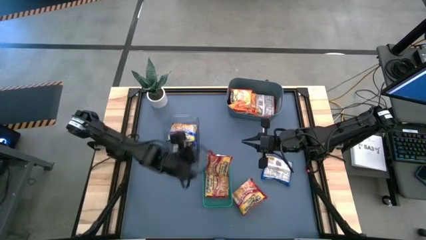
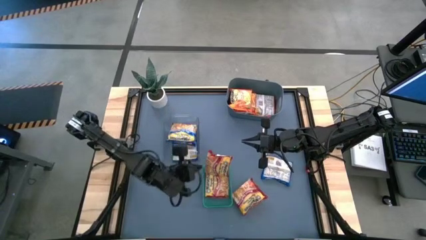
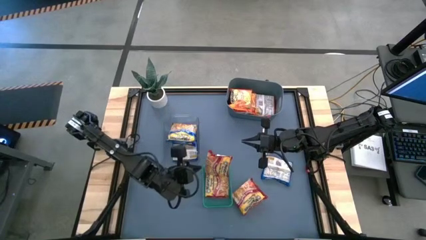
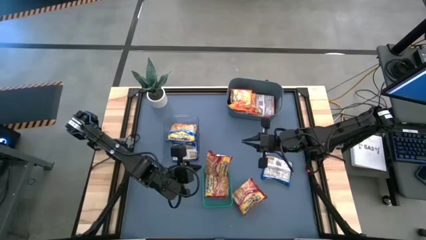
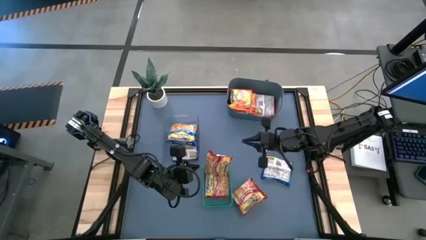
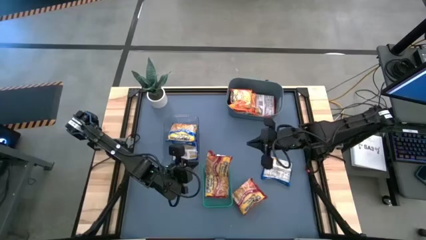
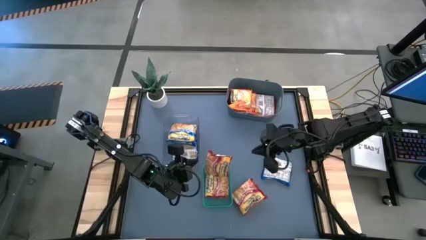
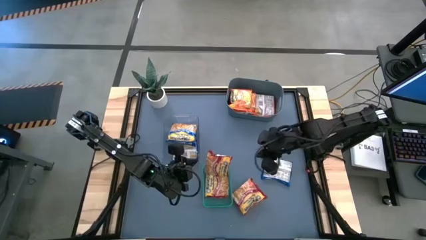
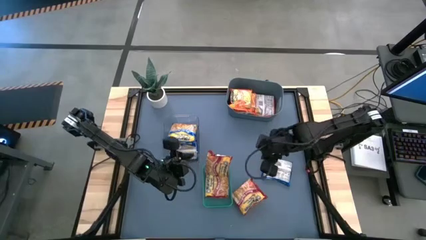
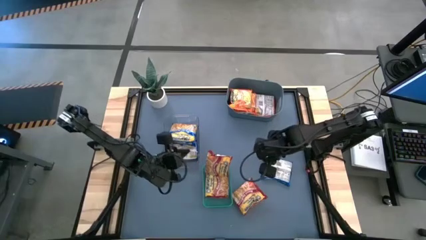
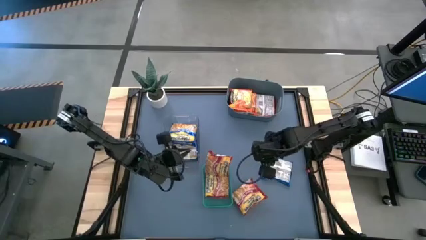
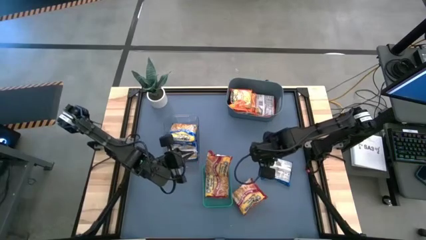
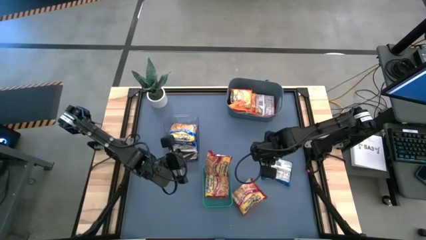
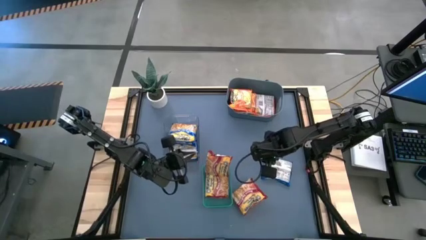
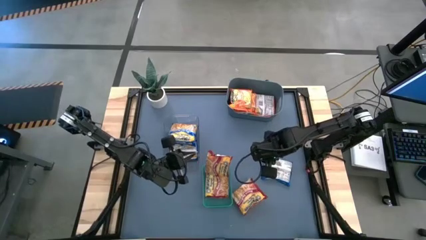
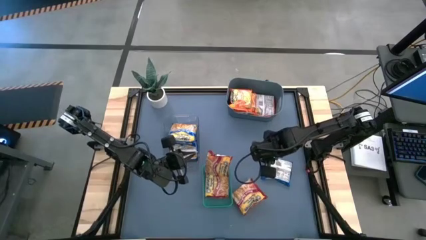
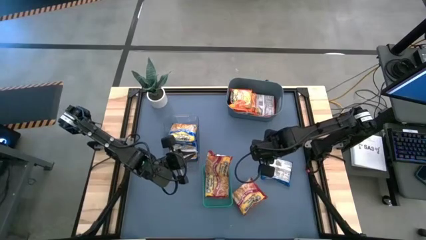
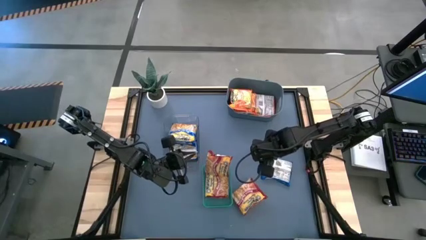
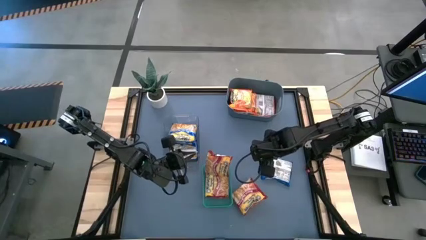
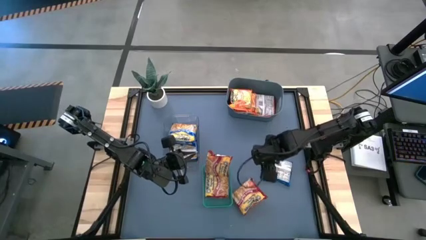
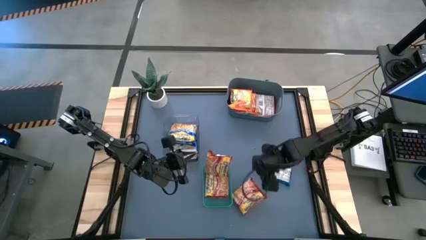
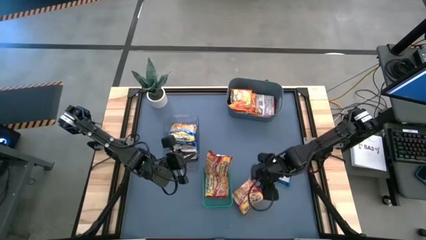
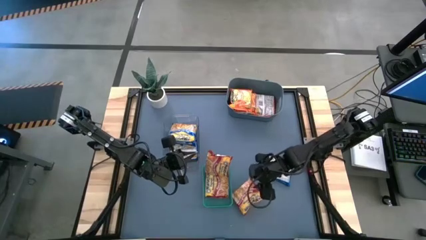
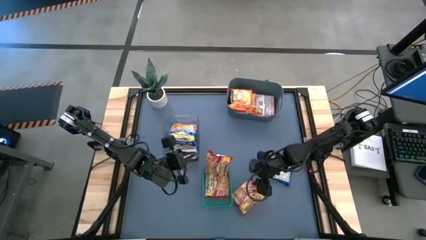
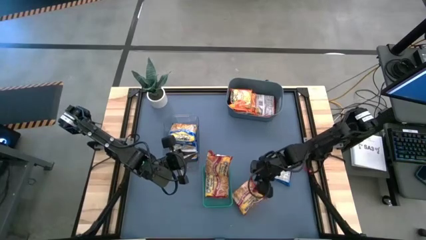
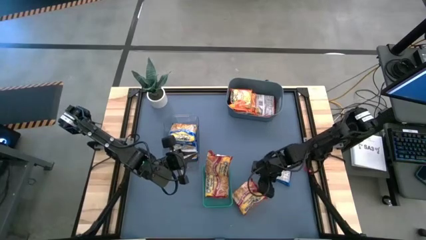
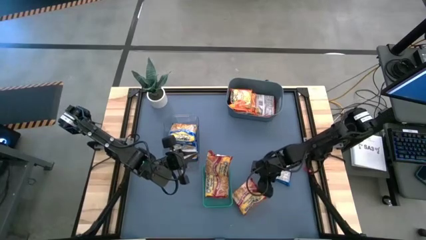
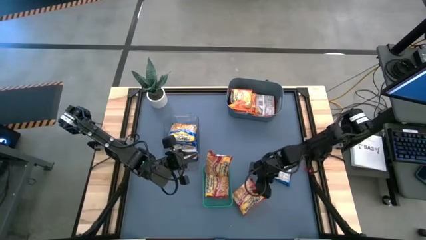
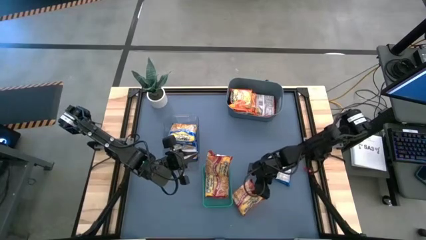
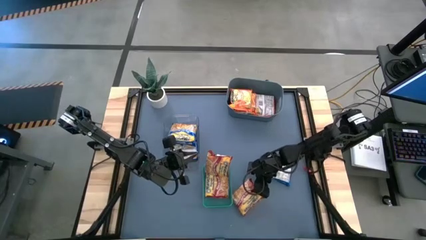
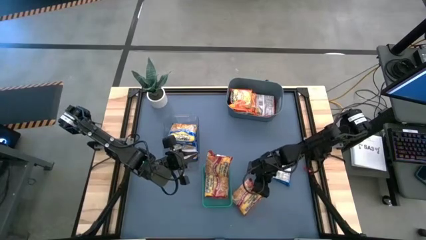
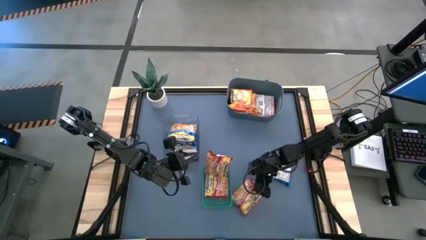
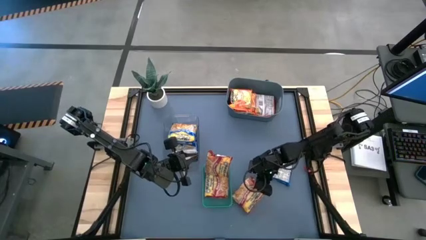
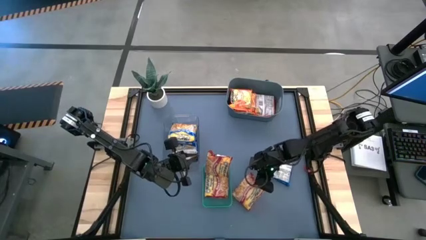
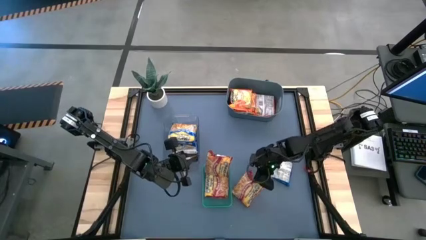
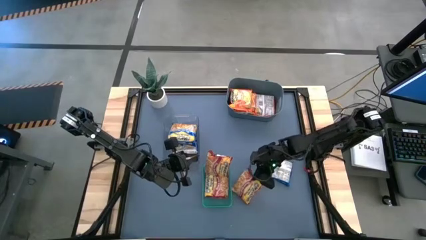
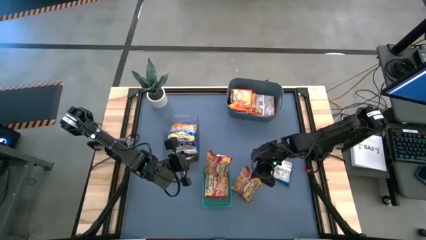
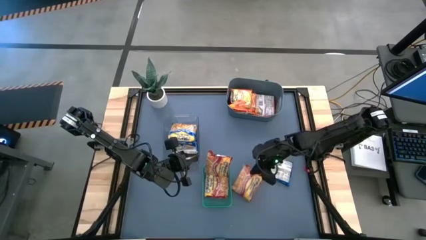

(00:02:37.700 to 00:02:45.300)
Task: Sort Maruchan noodles
Put the red noodle pack into the green bin

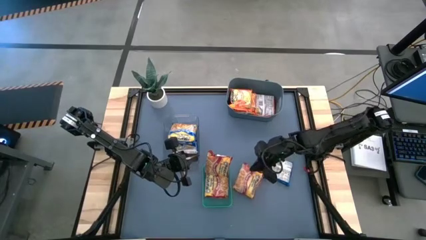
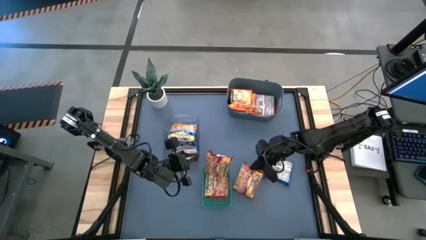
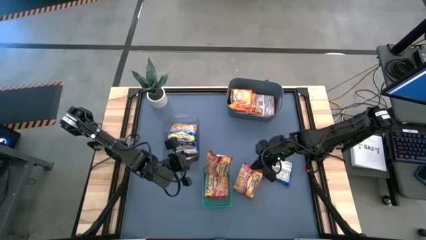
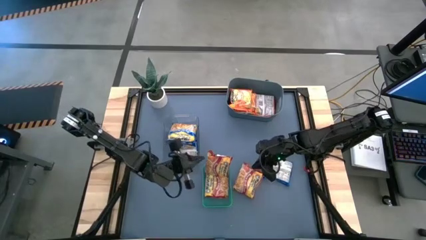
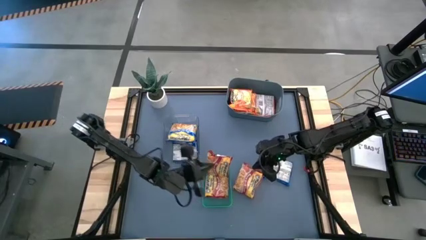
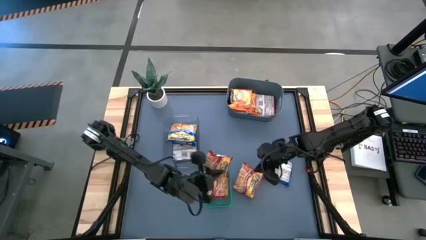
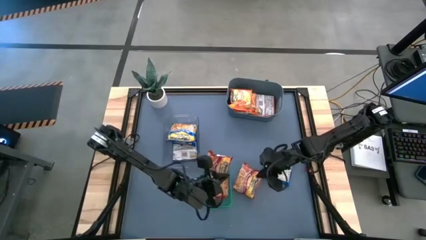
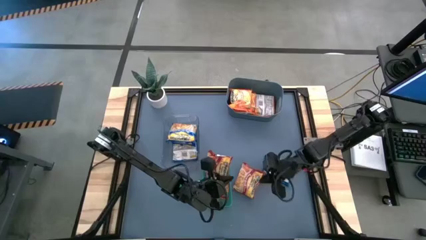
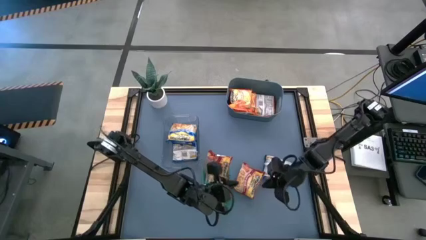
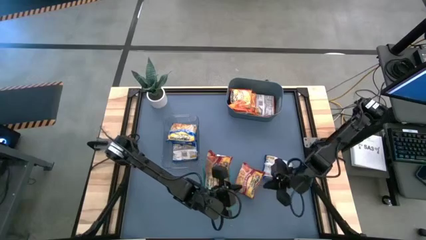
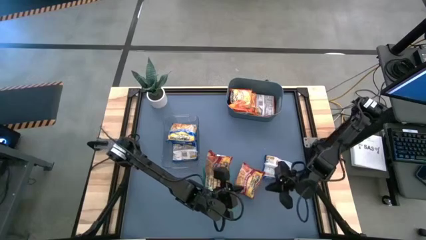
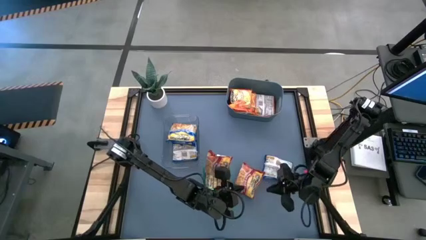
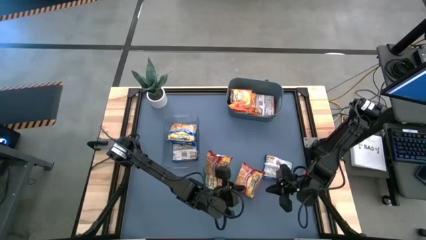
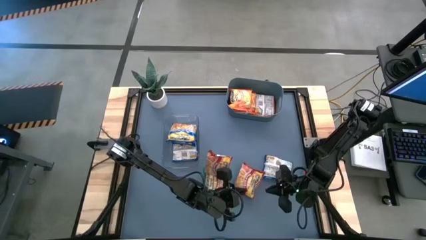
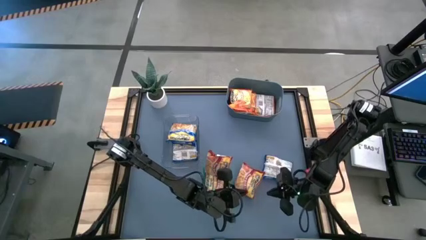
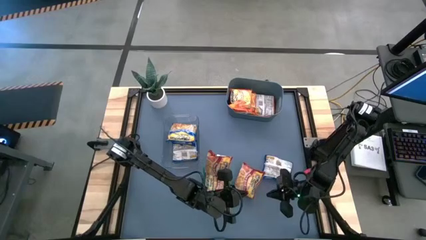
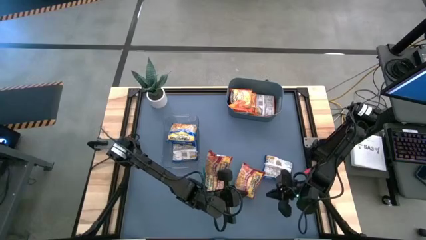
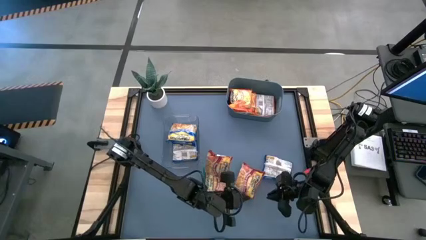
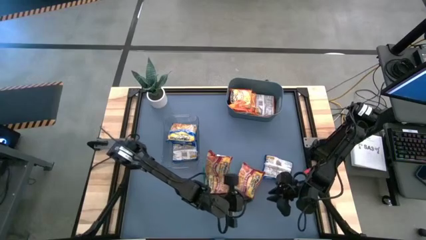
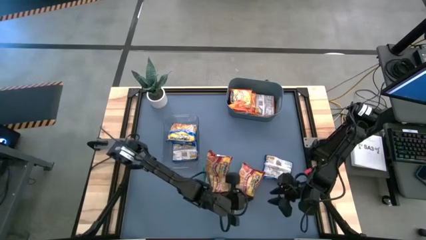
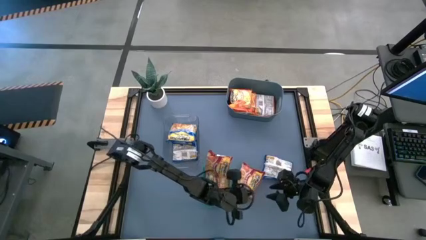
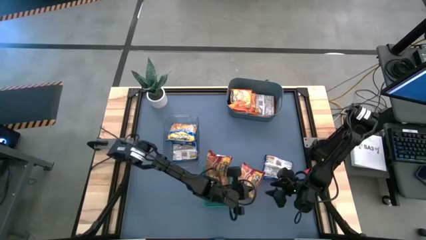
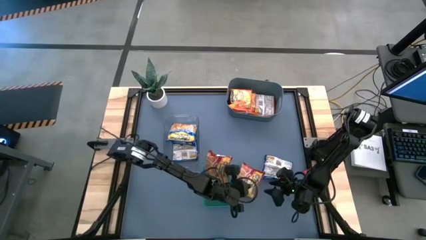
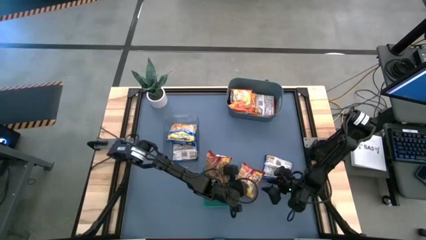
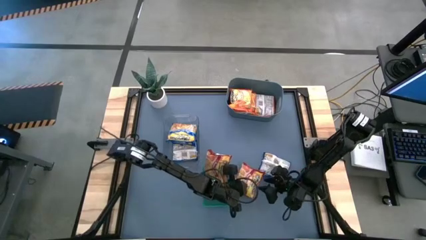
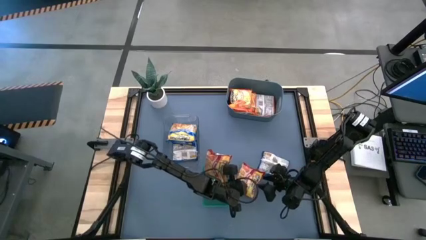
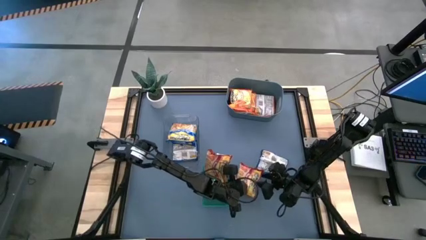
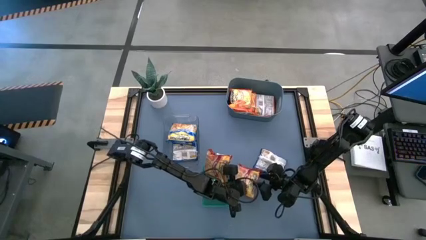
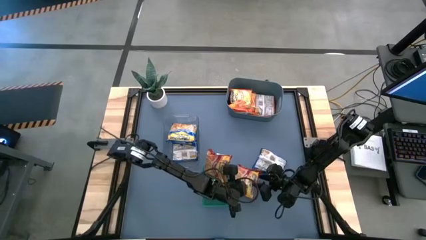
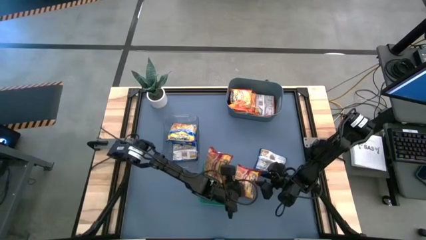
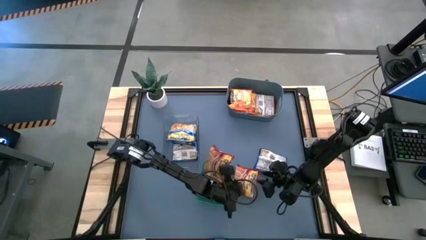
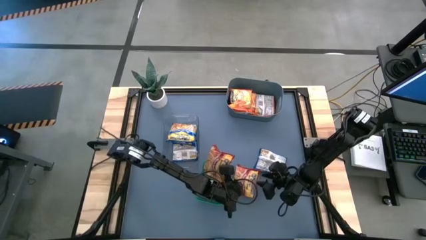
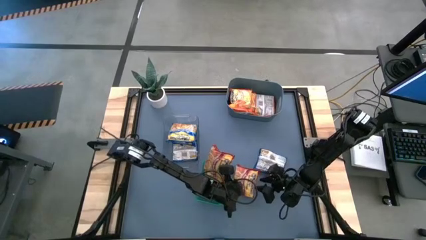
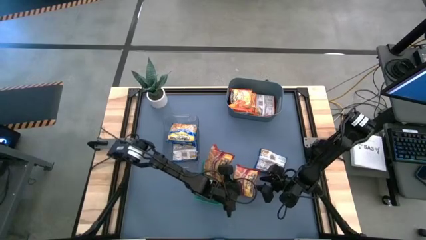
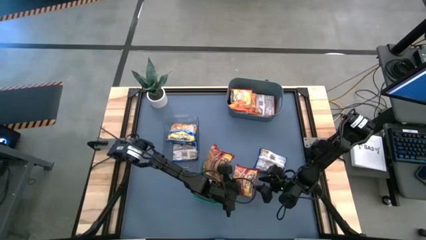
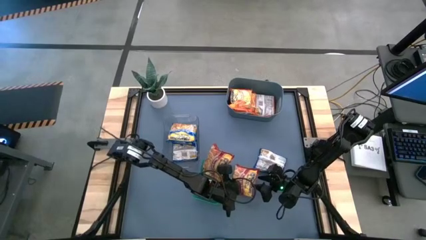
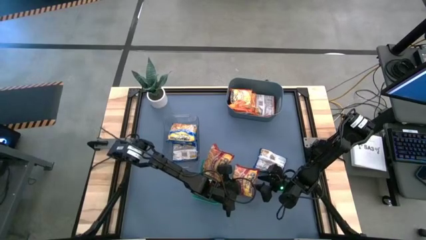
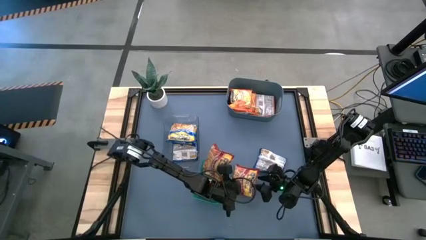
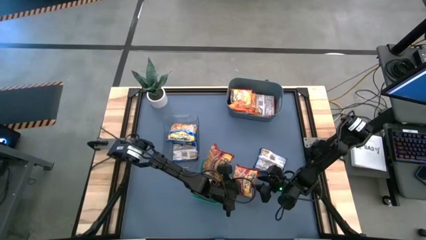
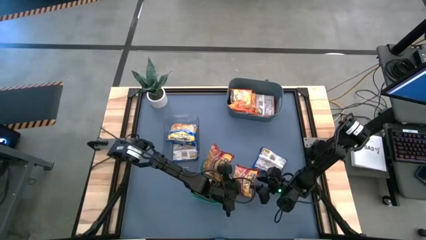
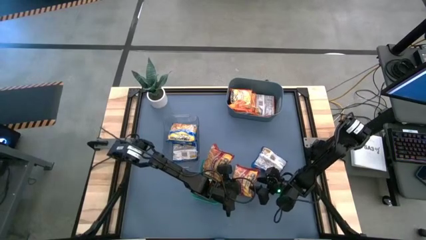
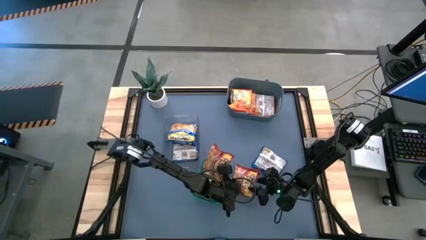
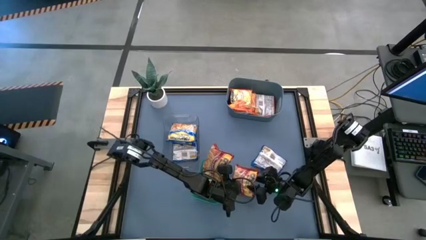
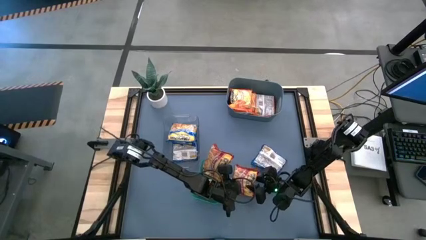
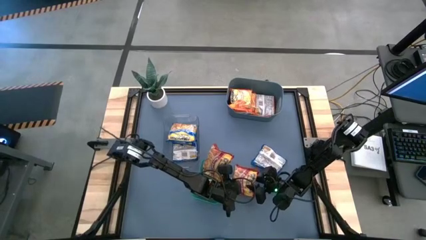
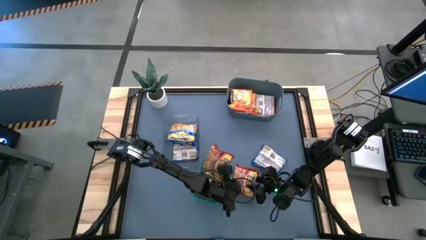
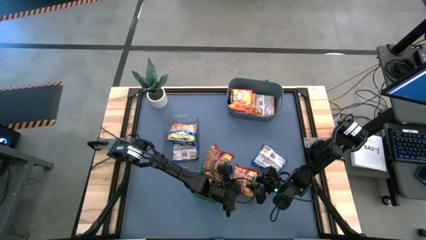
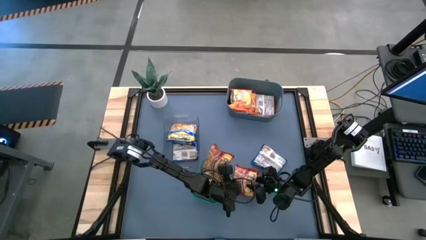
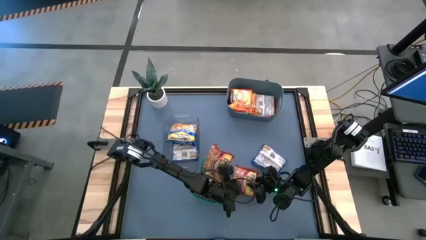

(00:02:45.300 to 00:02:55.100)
Put the red noodle pack into the green bin
